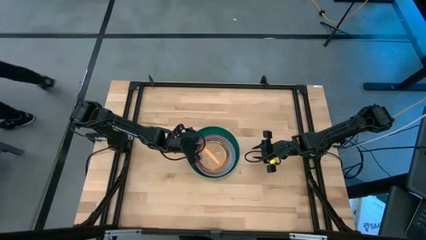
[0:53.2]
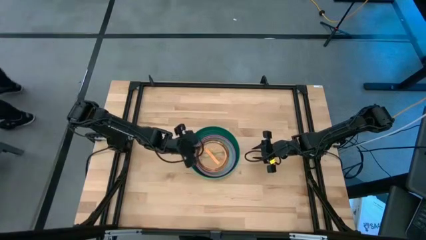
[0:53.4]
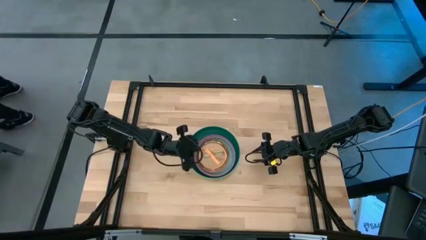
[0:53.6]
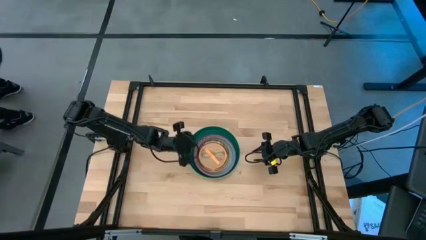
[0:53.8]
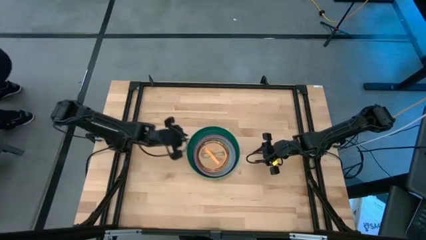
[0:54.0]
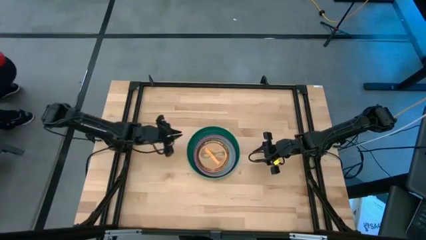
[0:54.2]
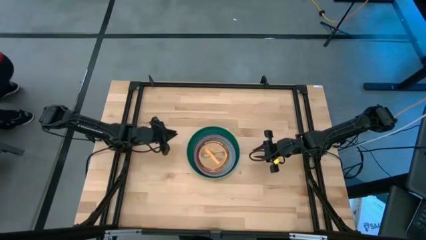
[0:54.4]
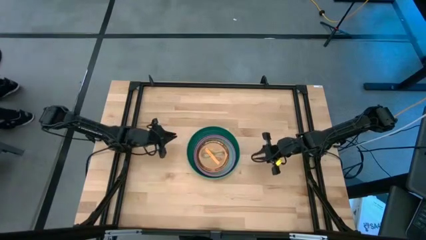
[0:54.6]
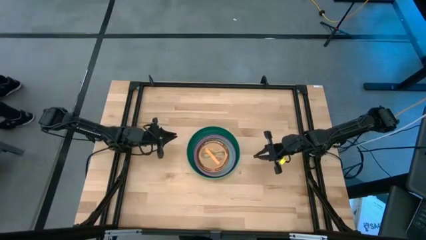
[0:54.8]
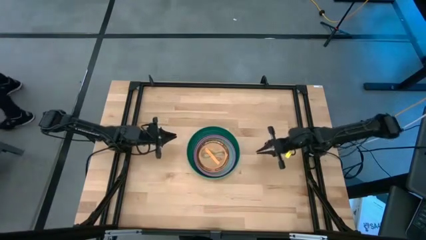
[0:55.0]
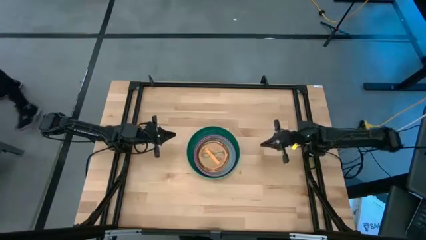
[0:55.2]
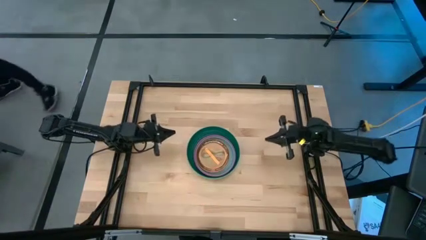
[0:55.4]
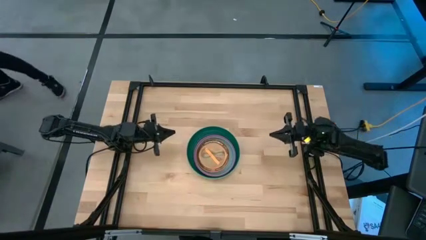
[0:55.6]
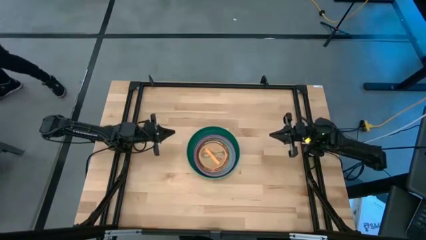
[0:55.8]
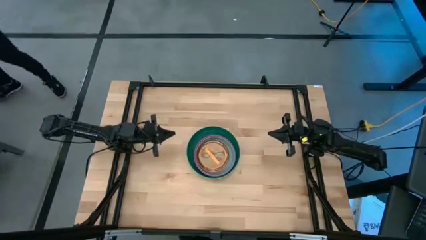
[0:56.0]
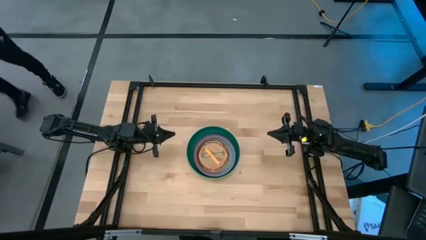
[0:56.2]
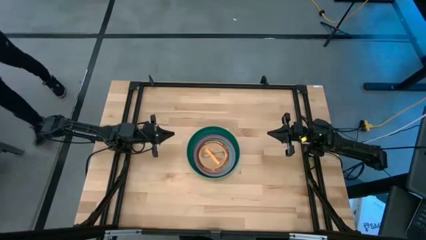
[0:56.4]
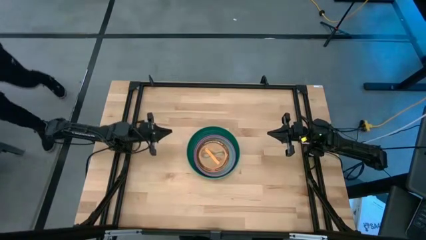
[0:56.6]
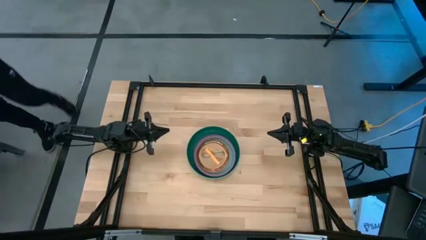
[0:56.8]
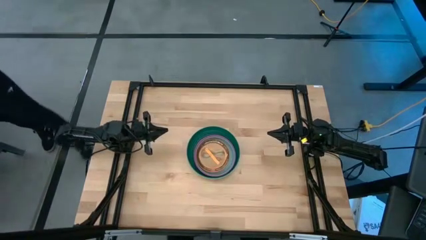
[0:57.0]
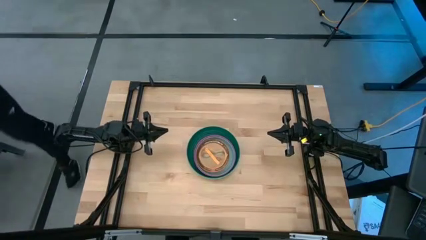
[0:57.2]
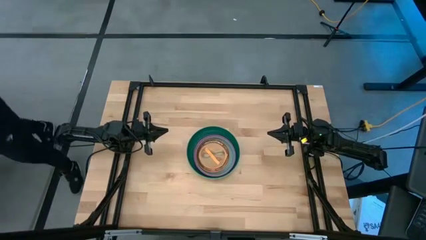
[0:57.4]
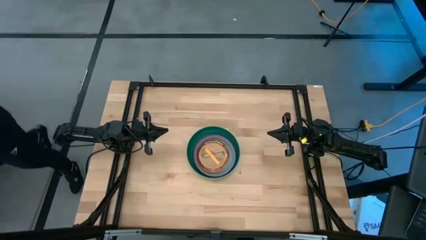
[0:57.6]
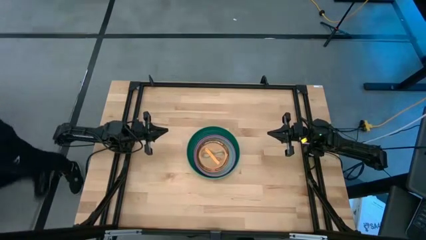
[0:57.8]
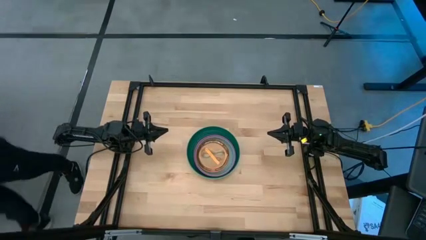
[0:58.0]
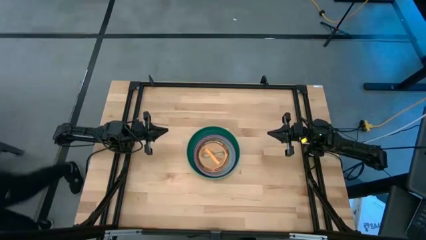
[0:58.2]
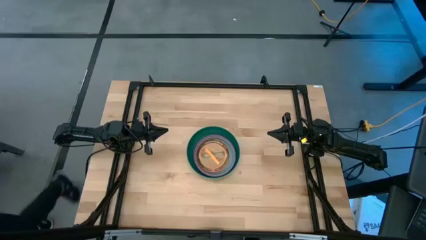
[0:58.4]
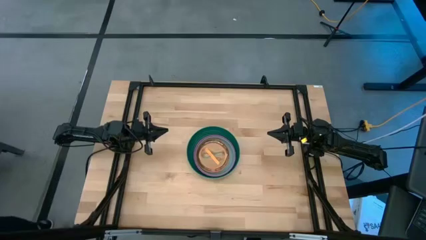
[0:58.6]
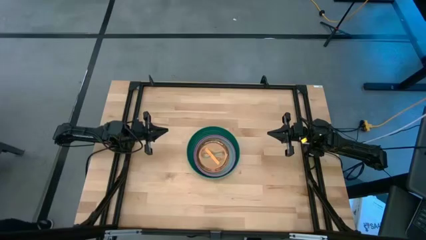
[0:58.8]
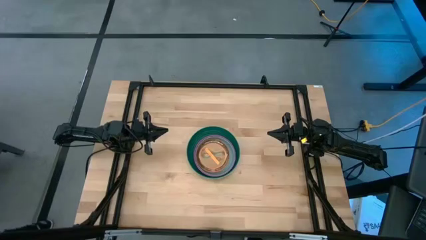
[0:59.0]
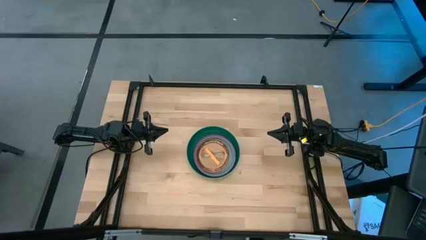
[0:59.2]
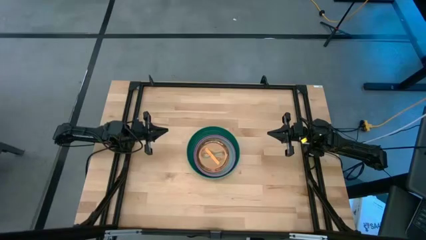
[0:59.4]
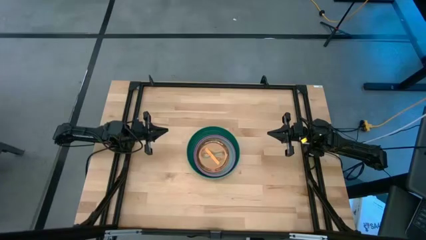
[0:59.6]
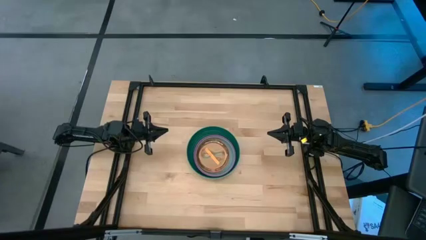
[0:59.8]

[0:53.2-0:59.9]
Task: Stack plastic plates
Return to Home Position

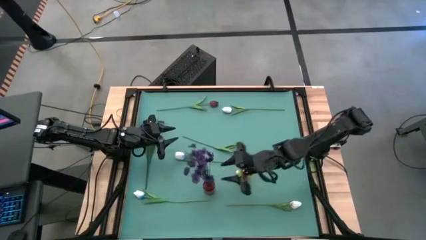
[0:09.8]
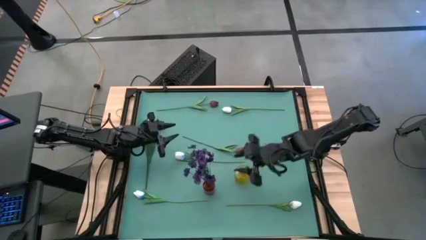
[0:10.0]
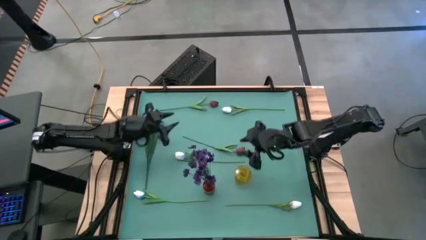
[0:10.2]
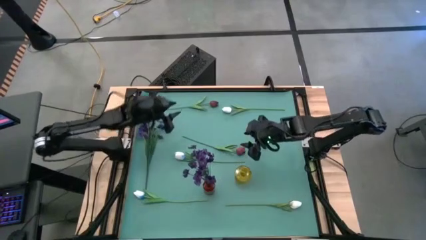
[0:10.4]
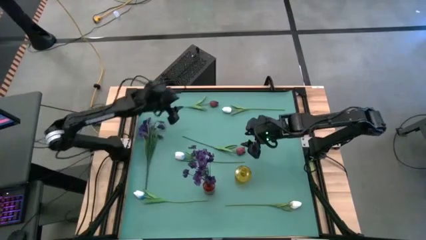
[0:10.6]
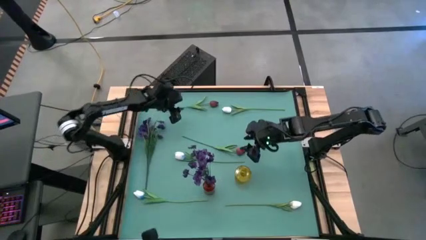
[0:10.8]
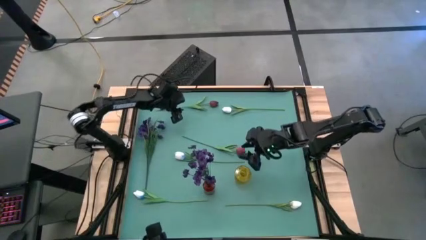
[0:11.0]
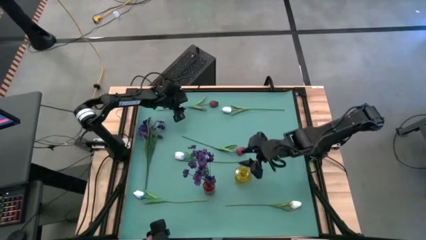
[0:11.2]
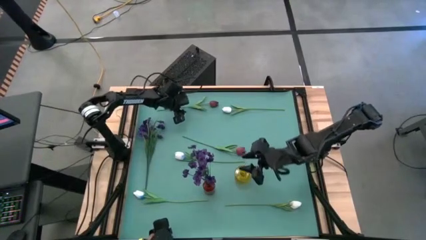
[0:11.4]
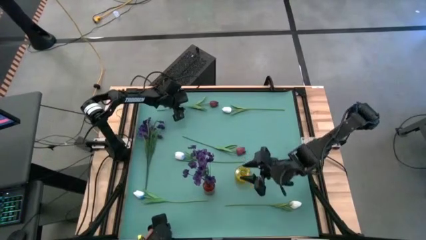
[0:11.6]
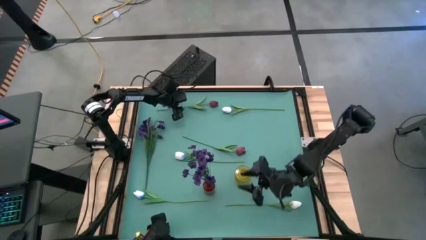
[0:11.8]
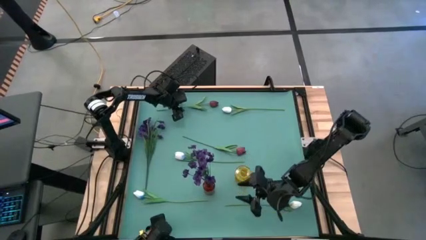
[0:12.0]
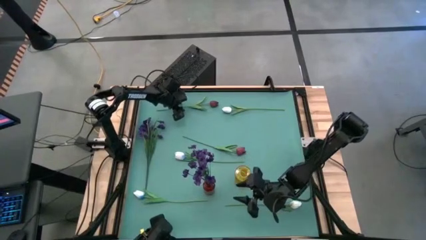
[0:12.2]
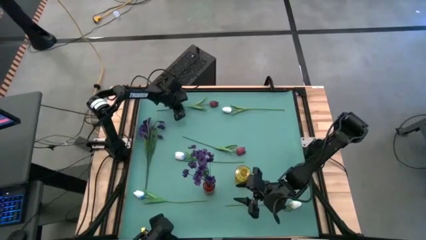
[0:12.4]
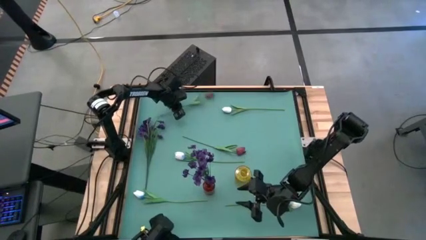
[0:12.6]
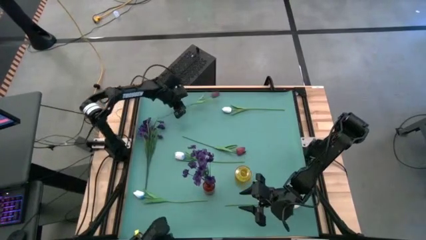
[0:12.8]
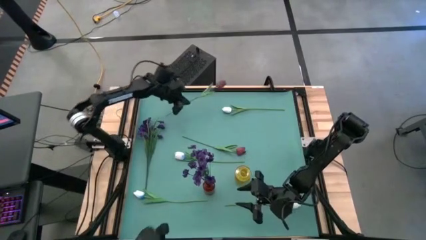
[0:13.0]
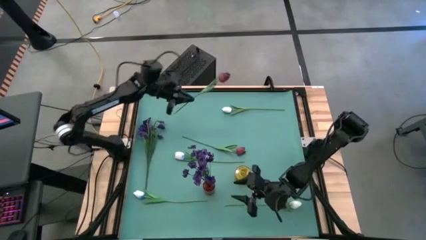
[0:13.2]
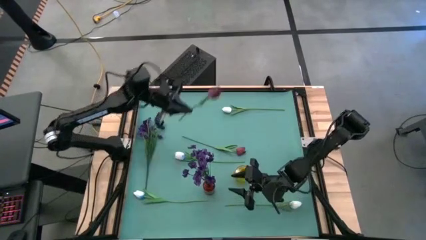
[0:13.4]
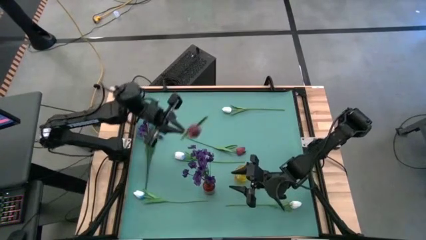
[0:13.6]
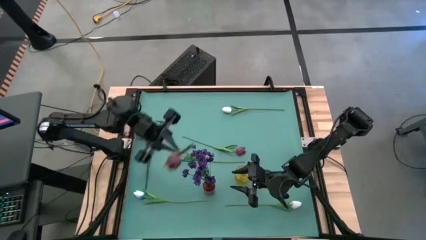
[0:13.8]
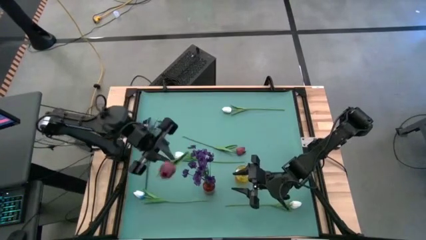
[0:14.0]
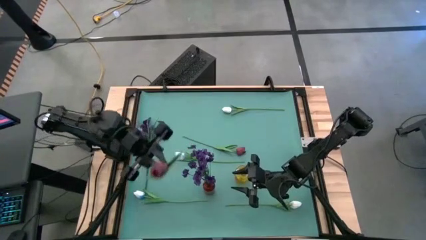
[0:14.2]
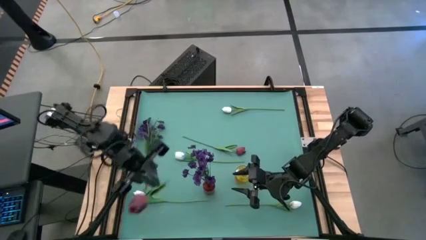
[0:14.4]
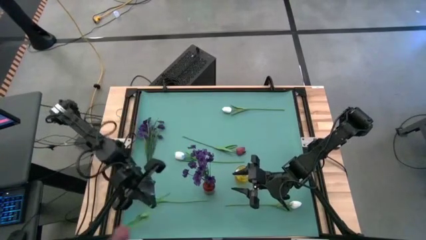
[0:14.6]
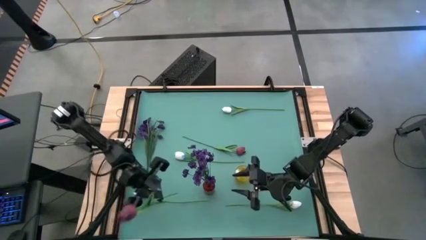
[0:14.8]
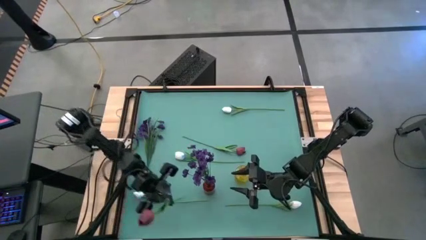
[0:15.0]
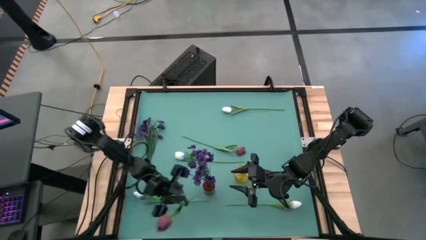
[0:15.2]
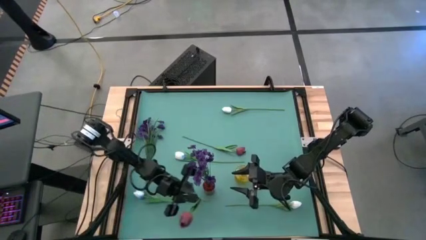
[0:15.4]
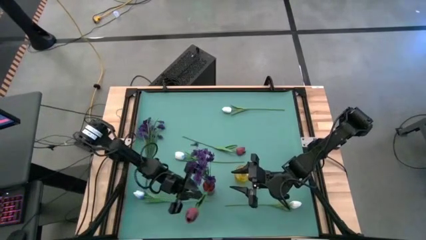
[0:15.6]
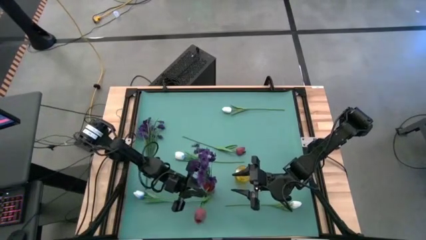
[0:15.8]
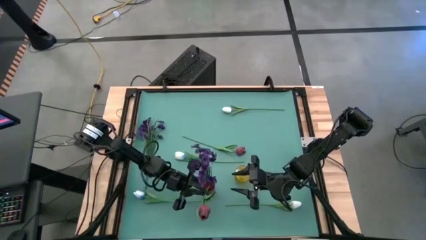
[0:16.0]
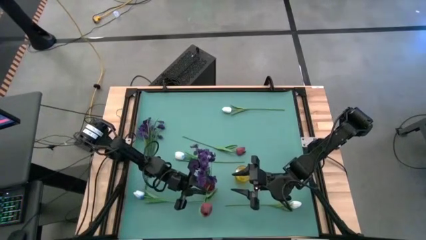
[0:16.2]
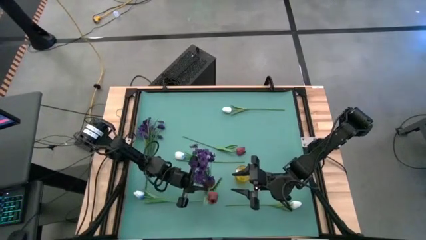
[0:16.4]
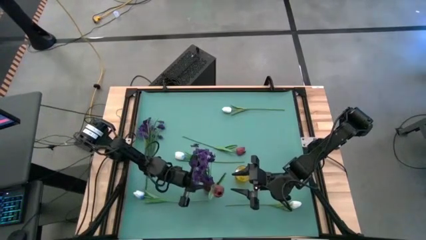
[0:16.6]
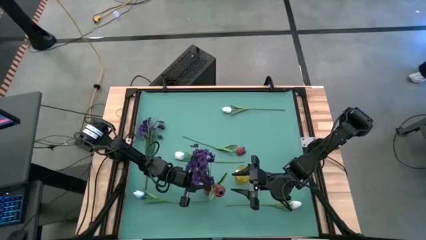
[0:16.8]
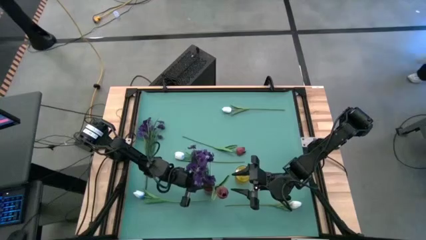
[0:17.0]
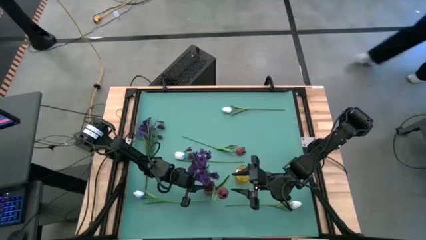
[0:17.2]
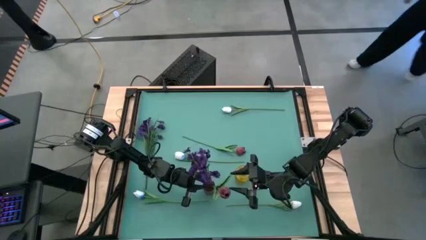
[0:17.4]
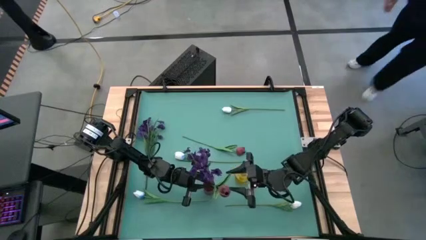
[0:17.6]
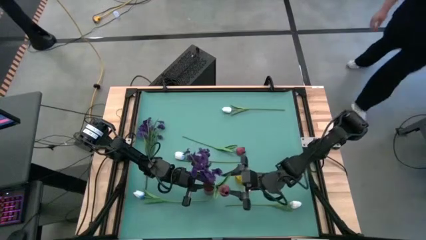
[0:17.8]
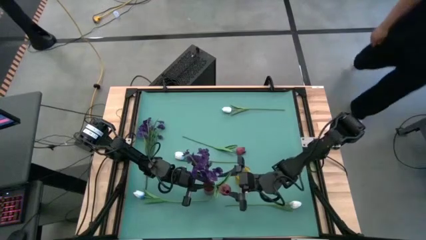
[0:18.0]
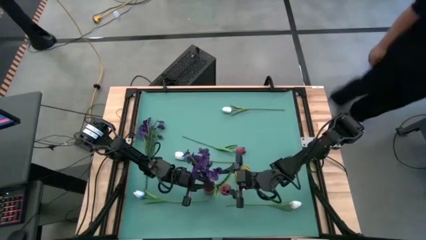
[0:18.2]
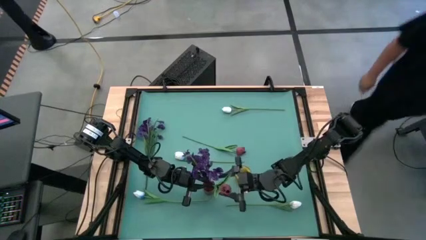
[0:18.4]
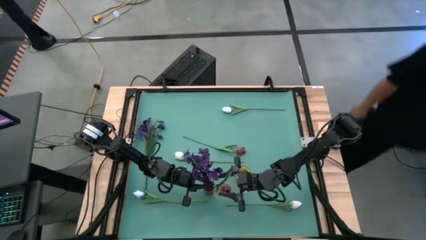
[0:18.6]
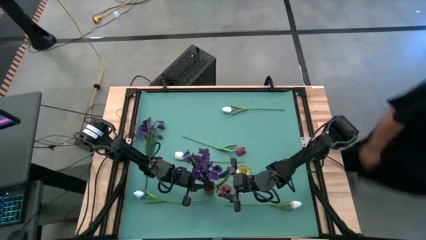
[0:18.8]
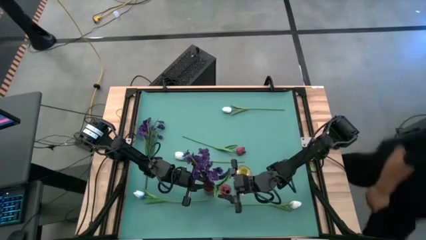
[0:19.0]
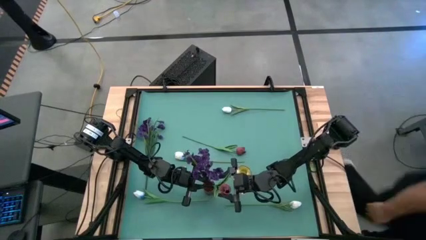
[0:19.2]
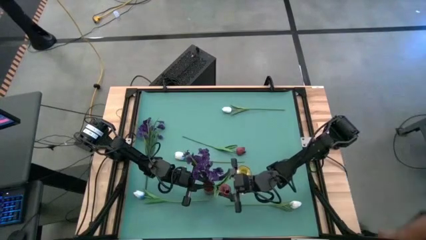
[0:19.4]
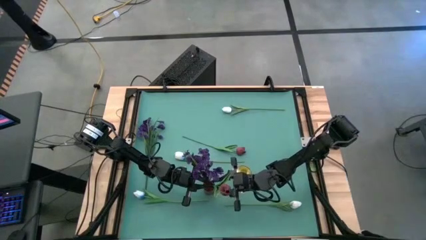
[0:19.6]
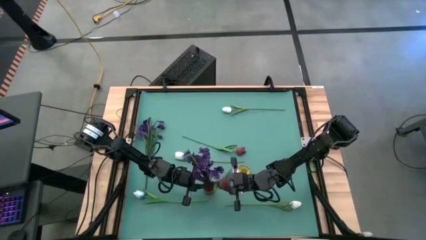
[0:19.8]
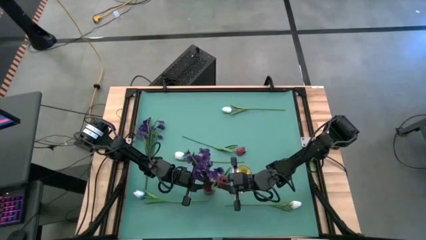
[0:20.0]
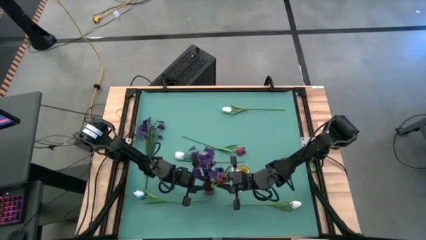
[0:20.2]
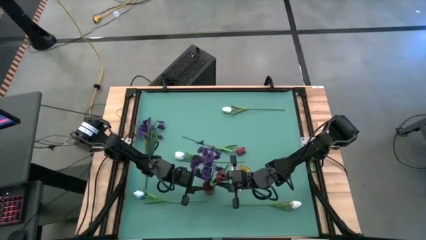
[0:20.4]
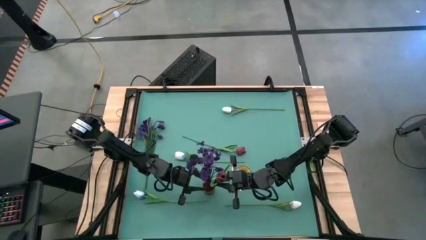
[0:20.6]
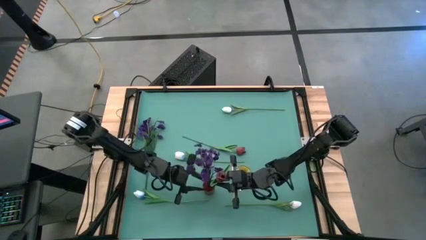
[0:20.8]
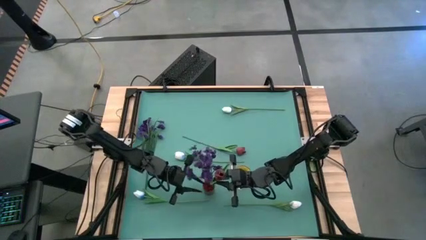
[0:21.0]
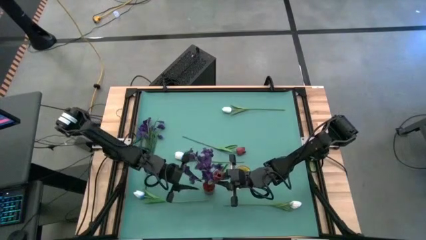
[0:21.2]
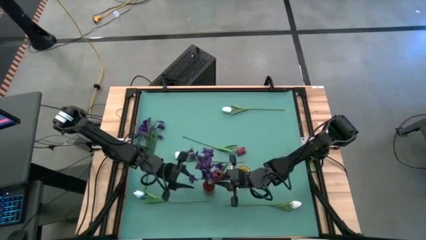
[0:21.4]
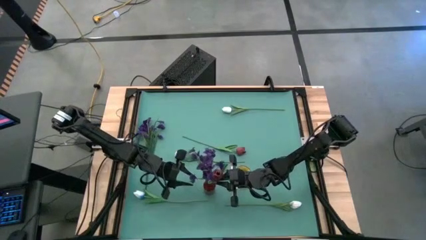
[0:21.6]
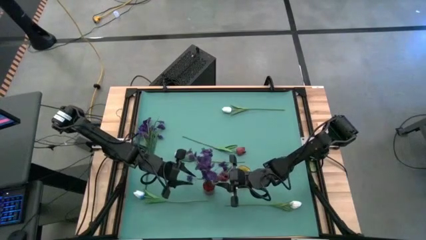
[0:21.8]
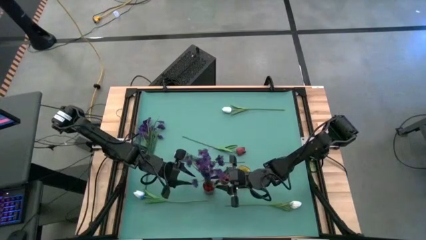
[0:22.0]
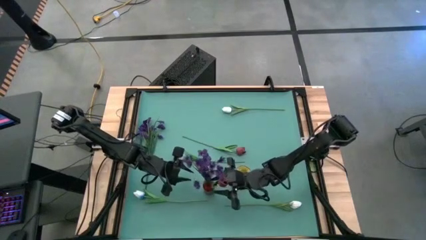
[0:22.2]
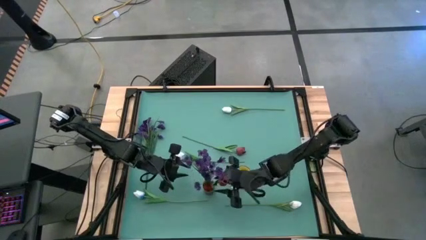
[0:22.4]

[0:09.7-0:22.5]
Task: Sort flowers into vase by color
Put the top red flower into the red flower vase
